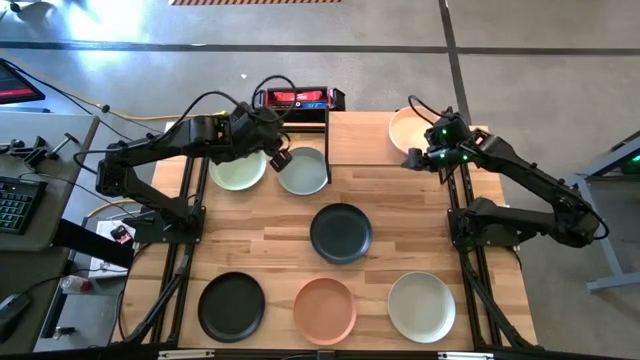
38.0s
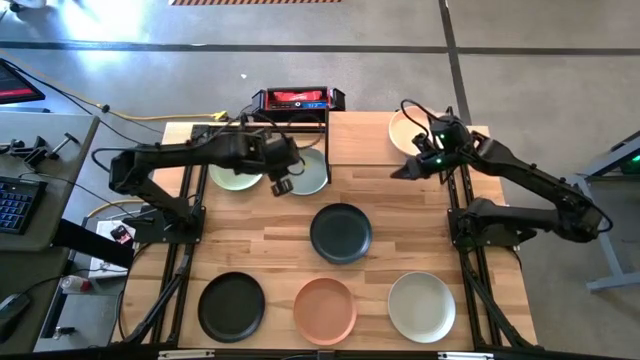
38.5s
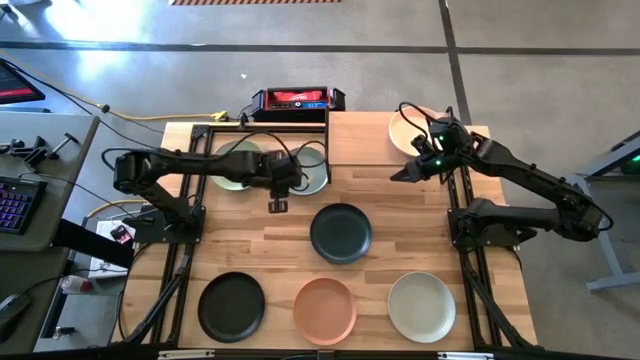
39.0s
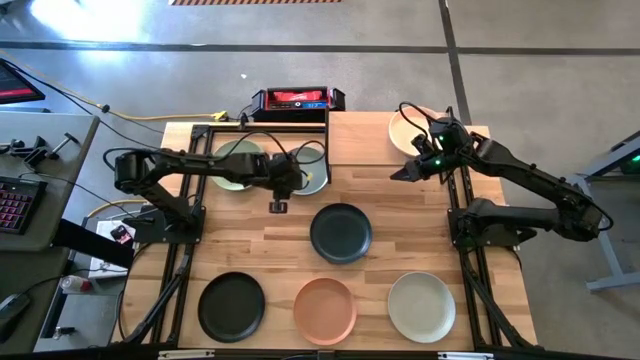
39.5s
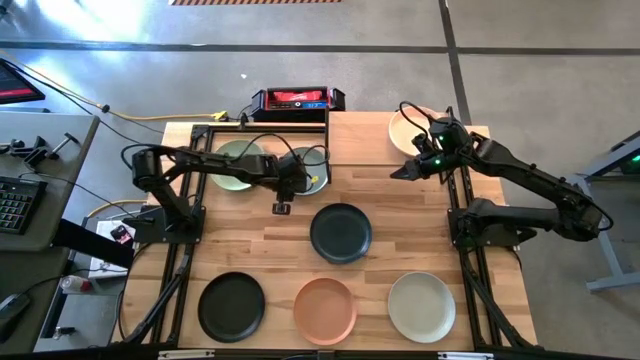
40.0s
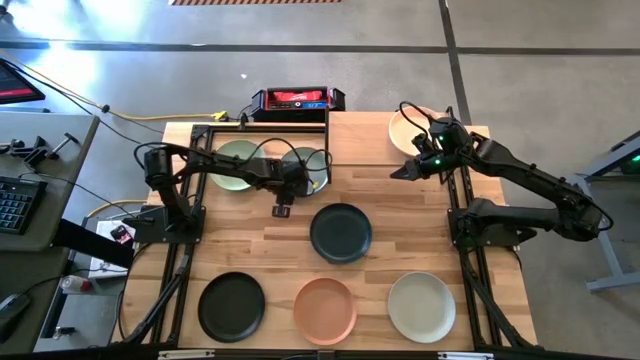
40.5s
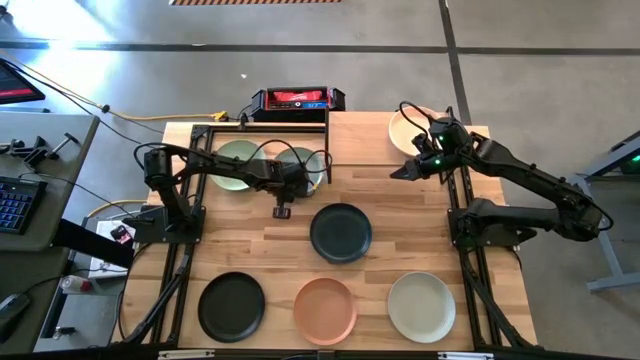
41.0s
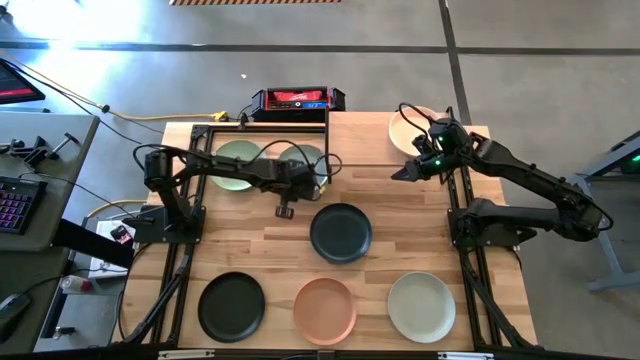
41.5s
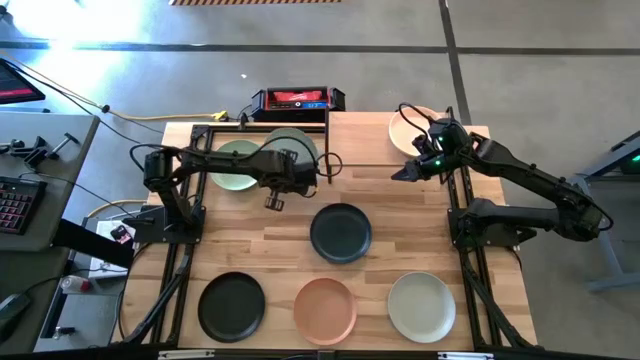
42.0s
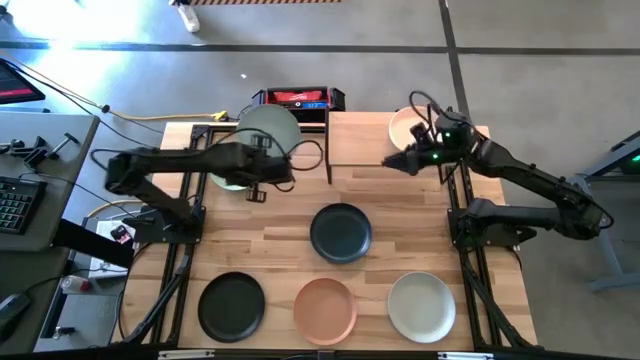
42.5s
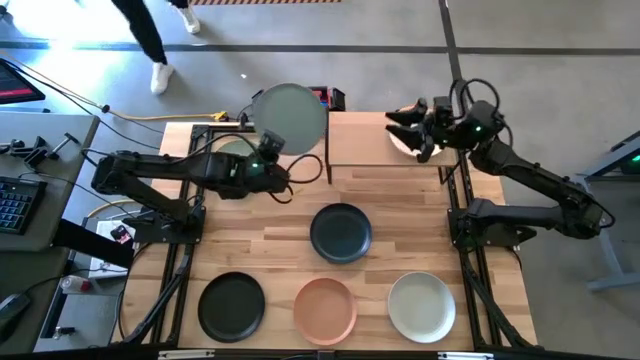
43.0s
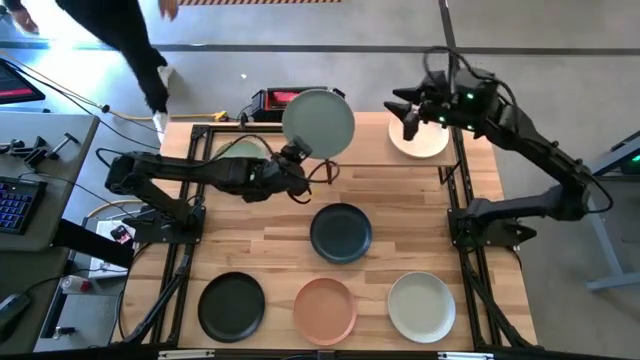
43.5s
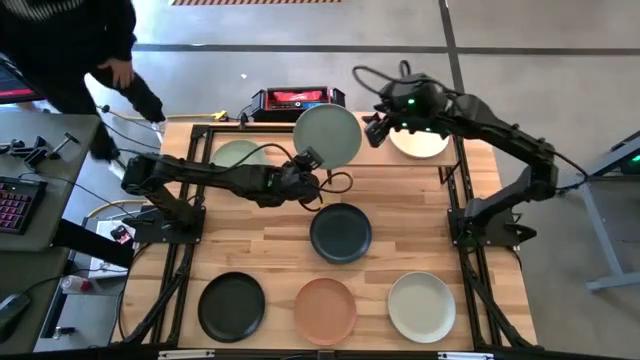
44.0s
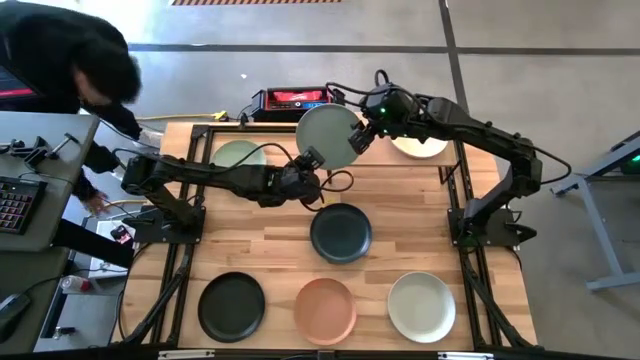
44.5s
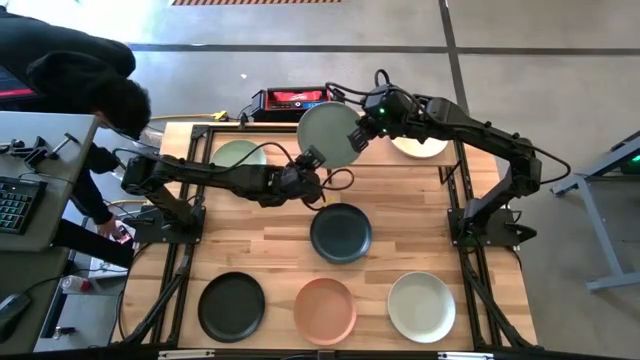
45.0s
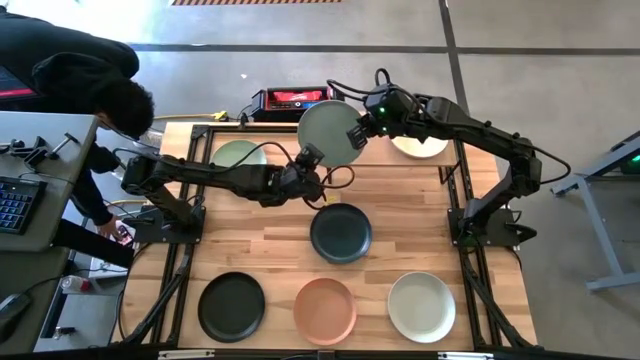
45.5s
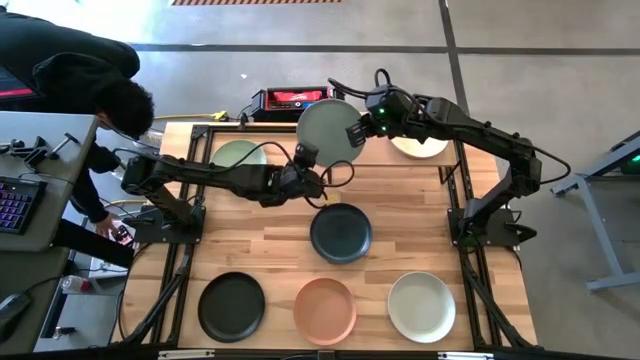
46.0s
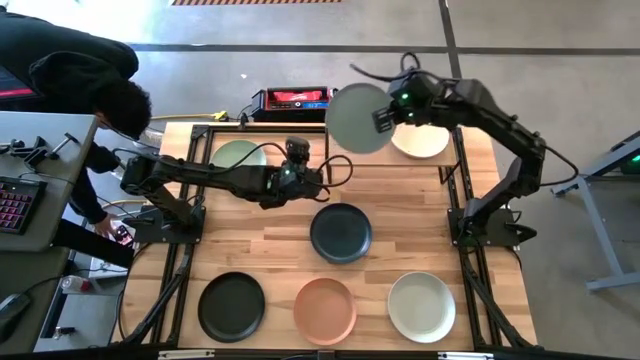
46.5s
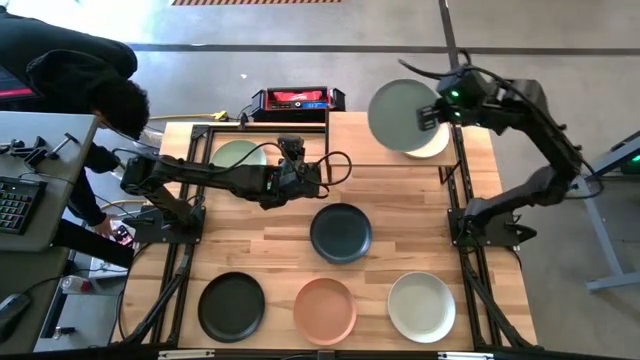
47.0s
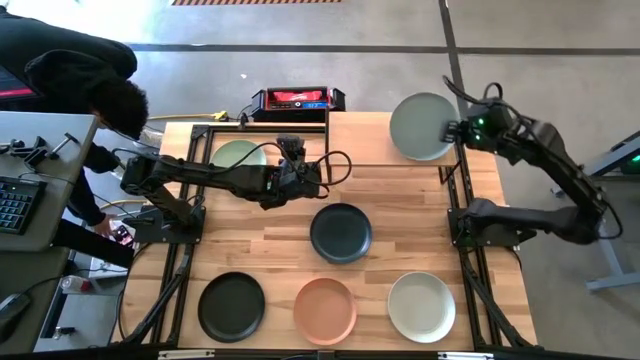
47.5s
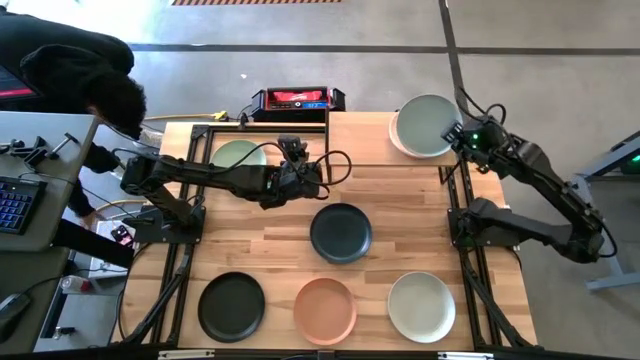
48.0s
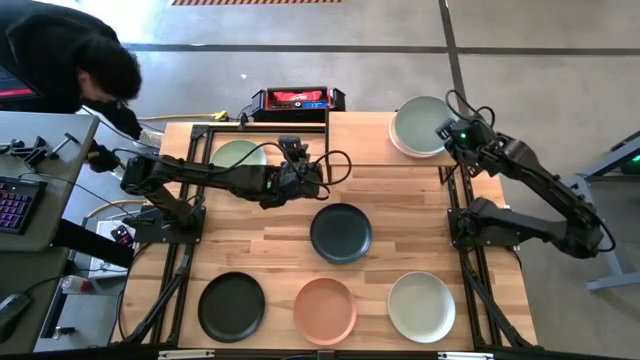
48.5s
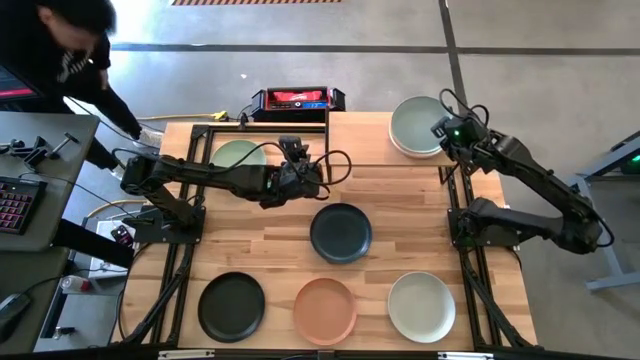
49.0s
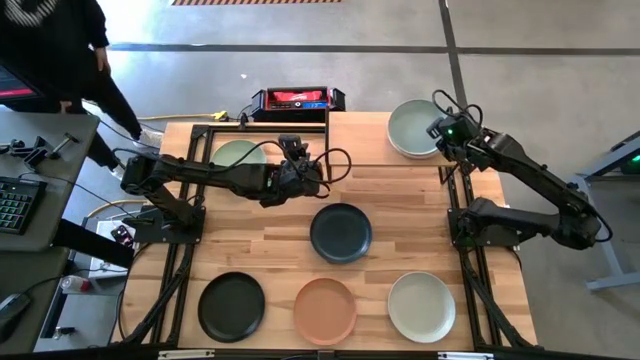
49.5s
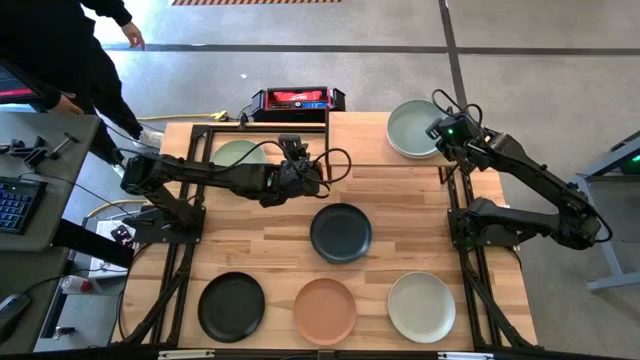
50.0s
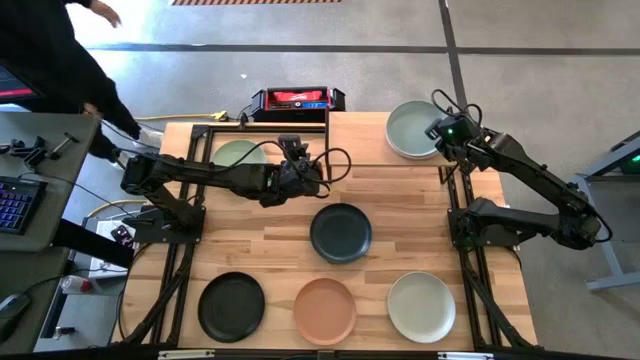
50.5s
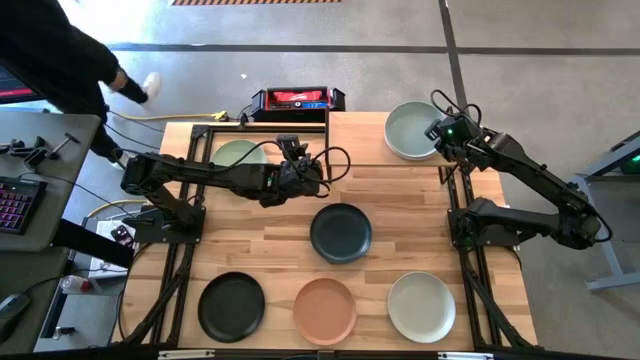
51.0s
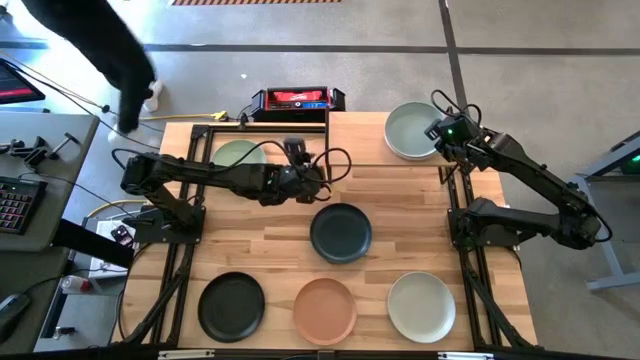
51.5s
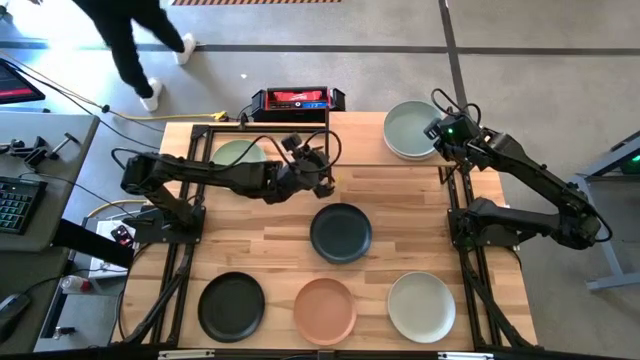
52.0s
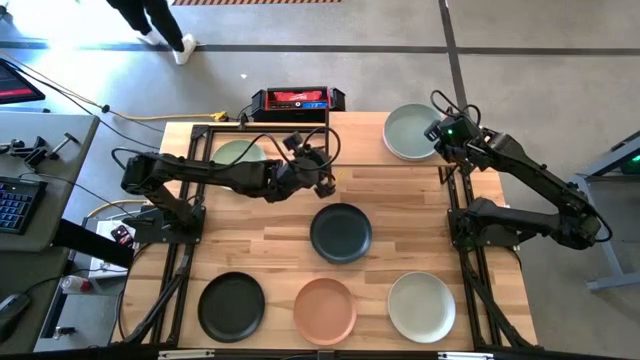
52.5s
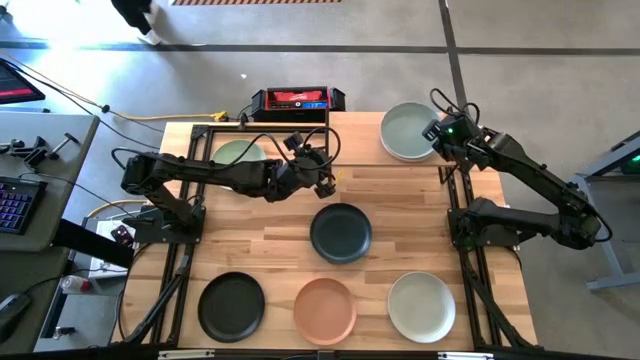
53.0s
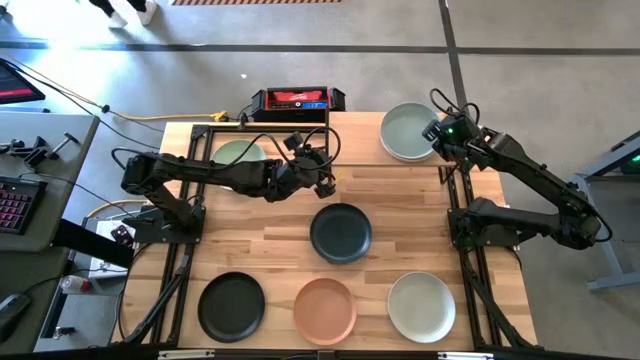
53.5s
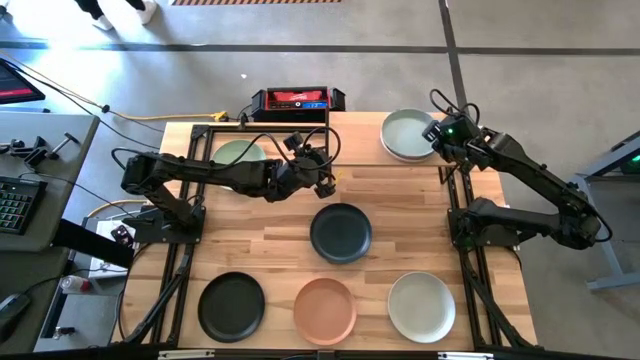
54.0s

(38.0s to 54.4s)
Task: Place and stack plates onto a shelf
Stack the gray plate on the orange plate on the shelf

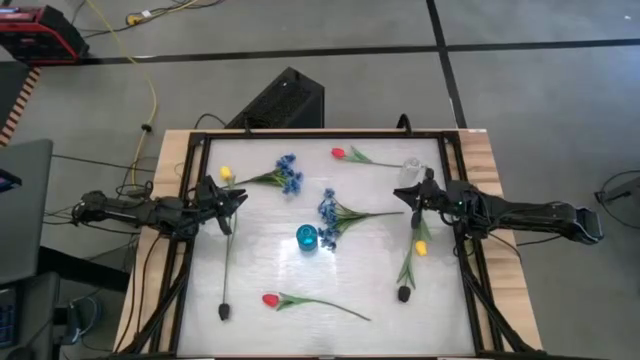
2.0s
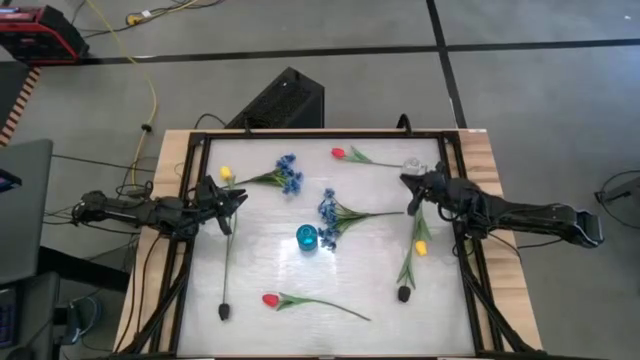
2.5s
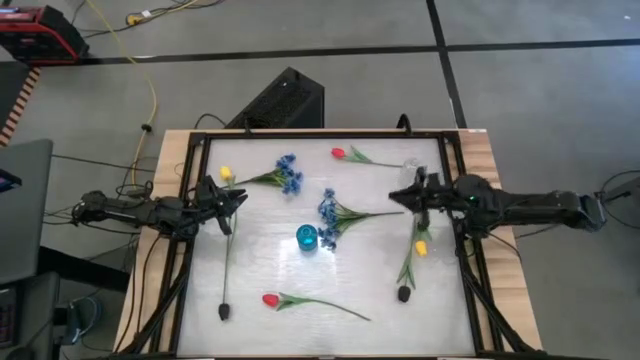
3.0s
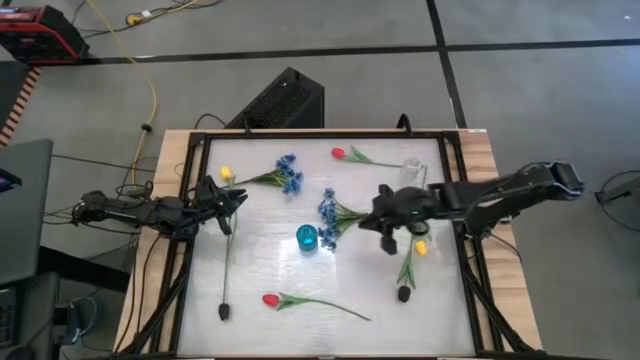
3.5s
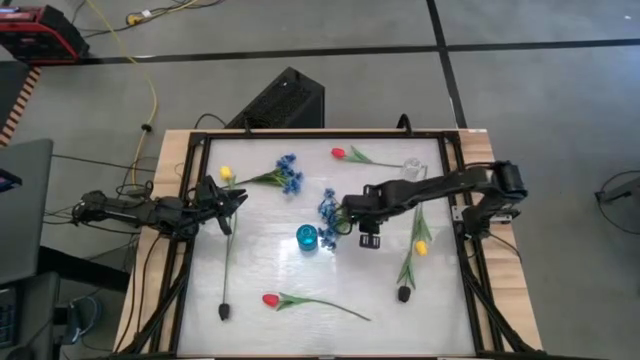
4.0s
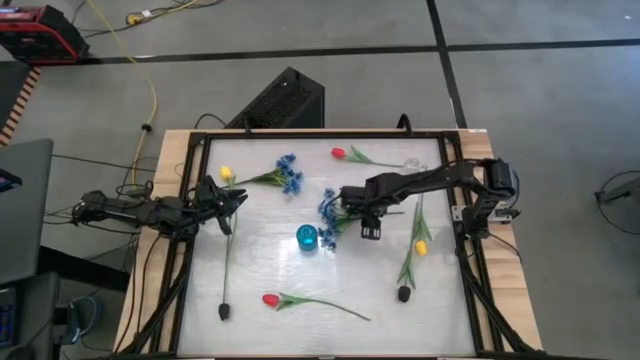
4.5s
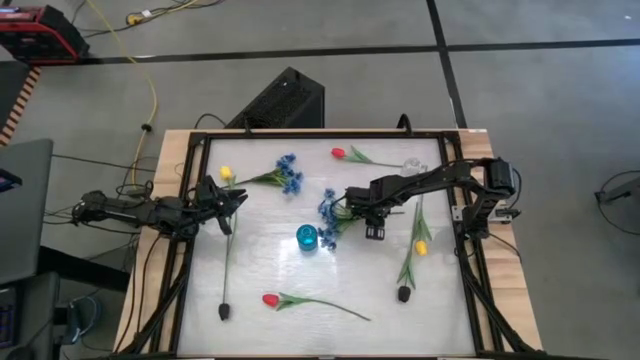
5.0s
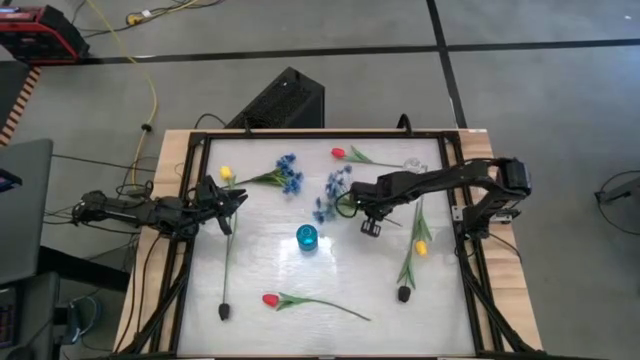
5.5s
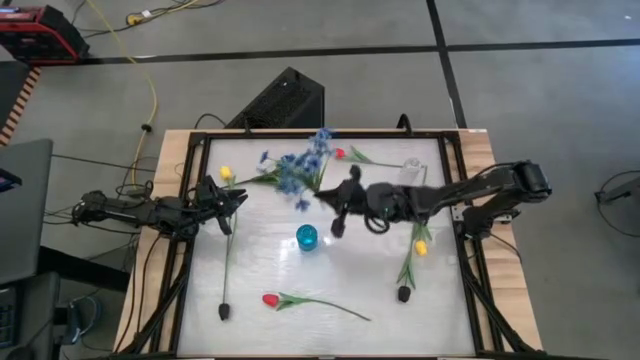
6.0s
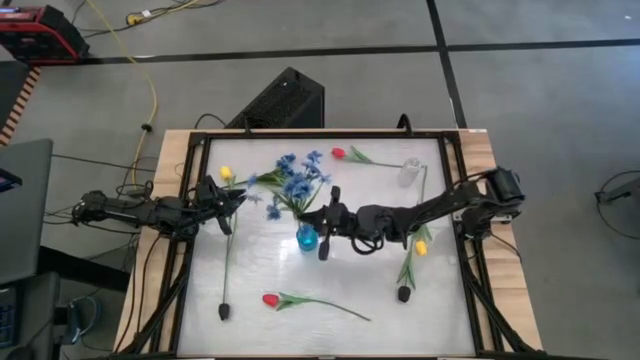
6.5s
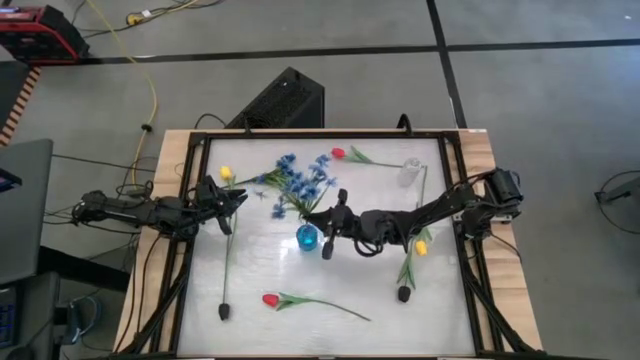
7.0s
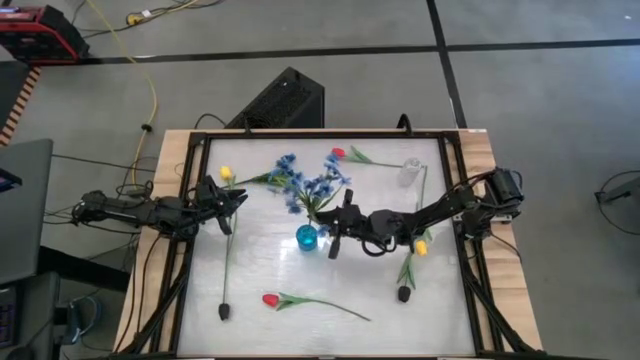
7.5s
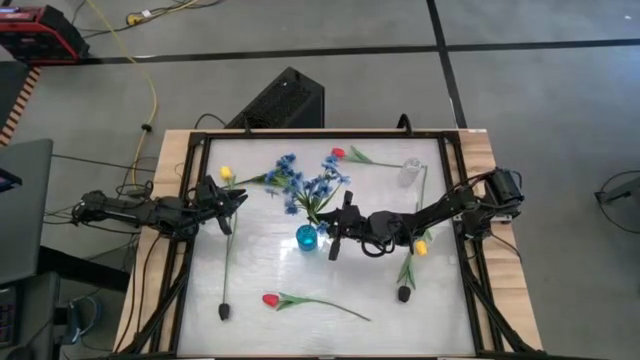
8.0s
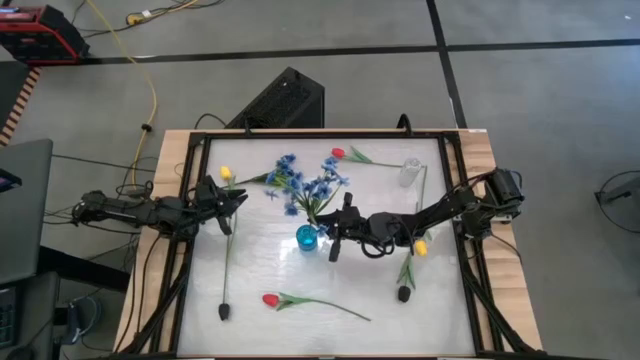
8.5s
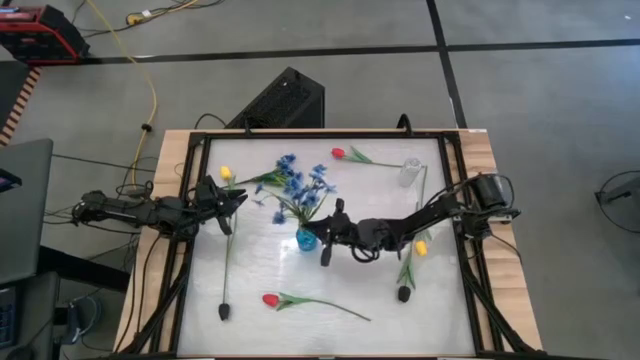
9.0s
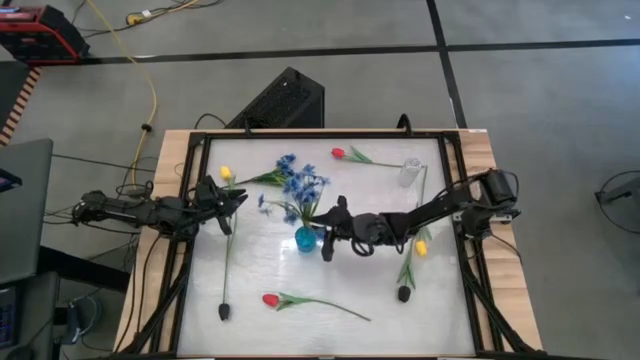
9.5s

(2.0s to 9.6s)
Task: Sort flowers into vase by color
Put the bottom blue flowers into the blue vase
